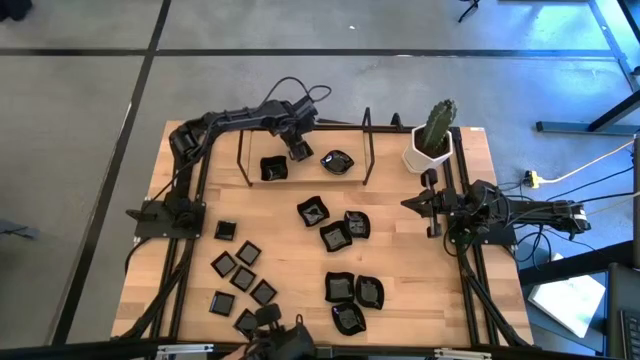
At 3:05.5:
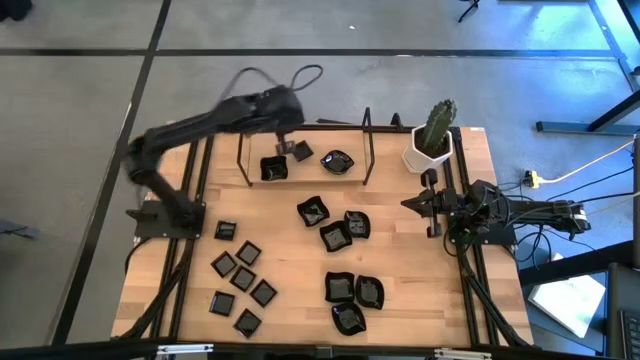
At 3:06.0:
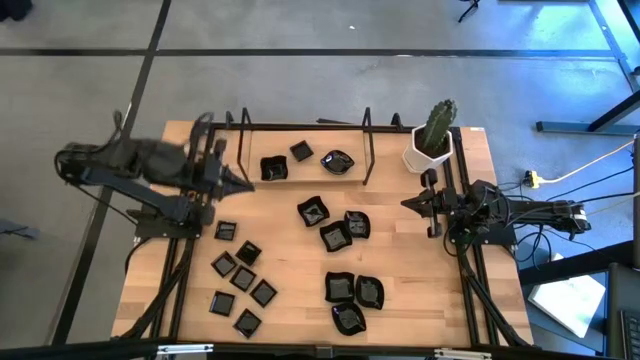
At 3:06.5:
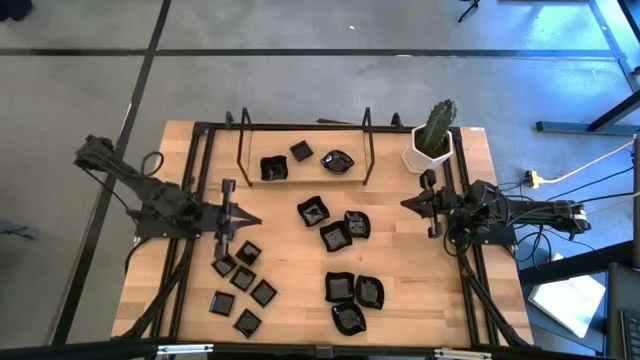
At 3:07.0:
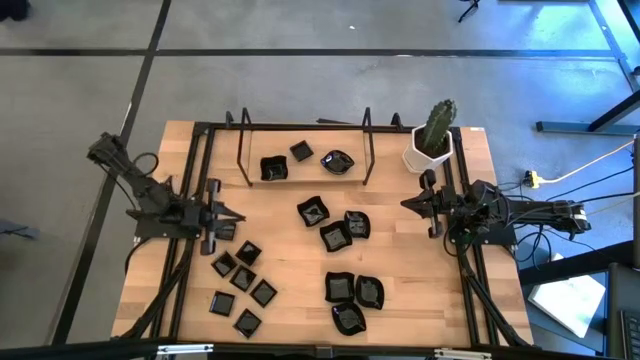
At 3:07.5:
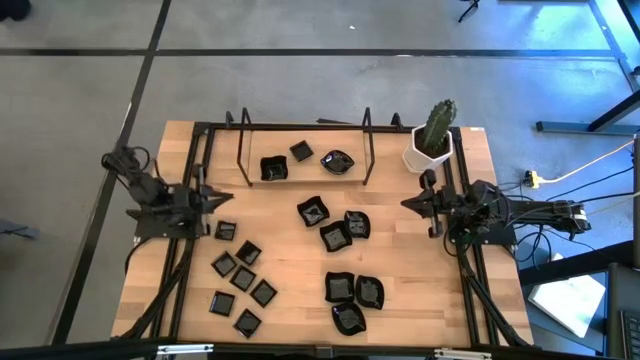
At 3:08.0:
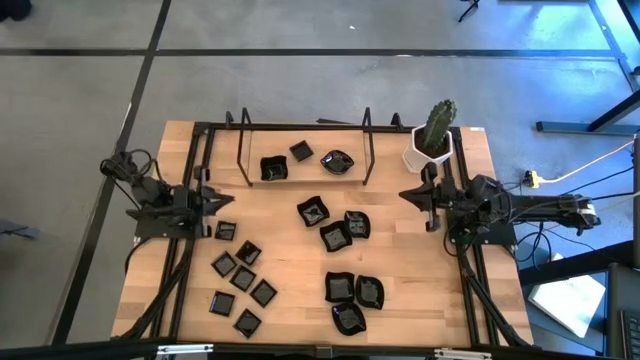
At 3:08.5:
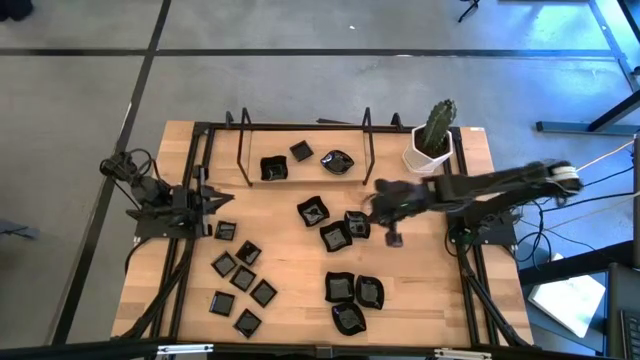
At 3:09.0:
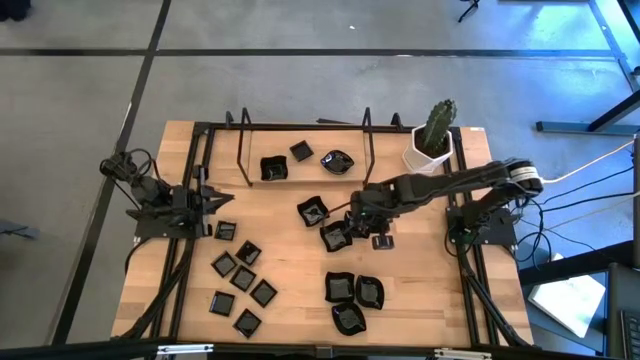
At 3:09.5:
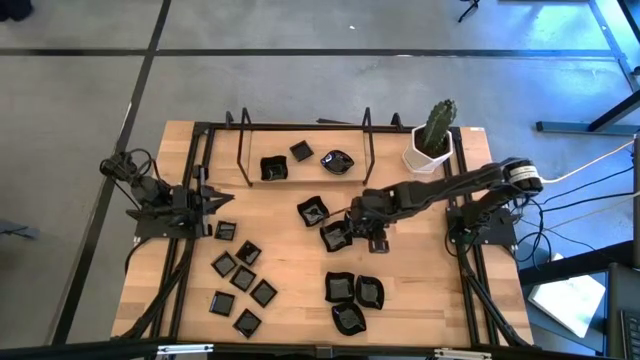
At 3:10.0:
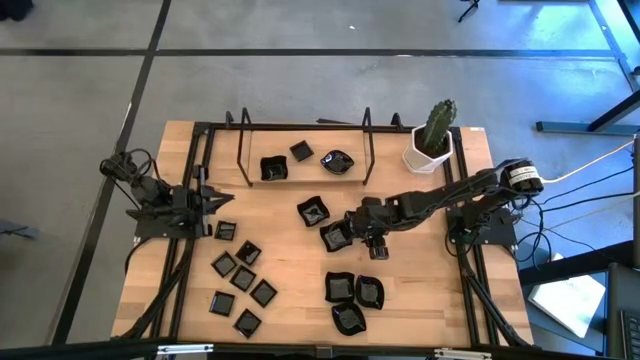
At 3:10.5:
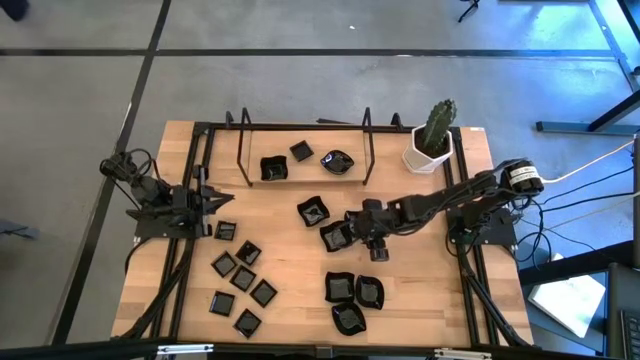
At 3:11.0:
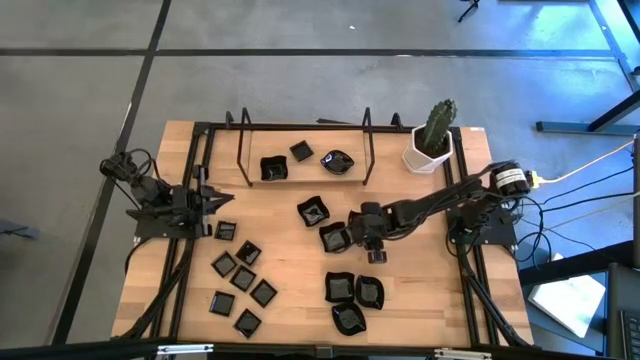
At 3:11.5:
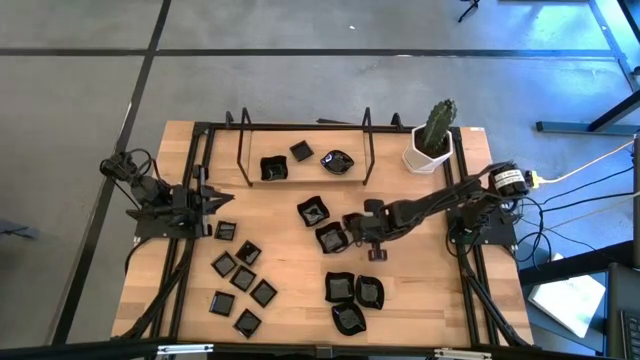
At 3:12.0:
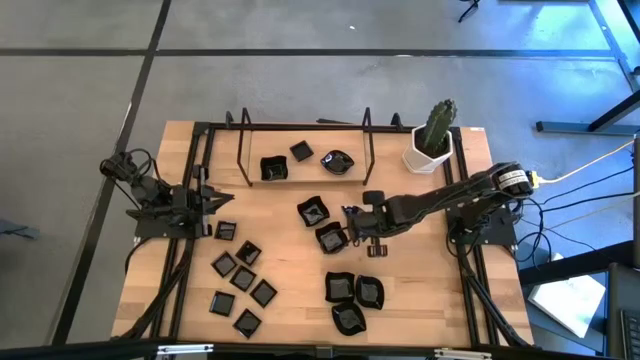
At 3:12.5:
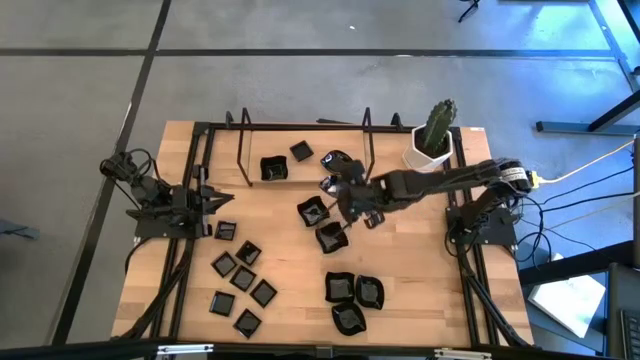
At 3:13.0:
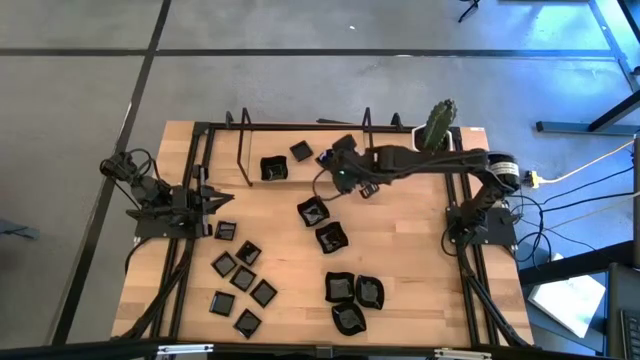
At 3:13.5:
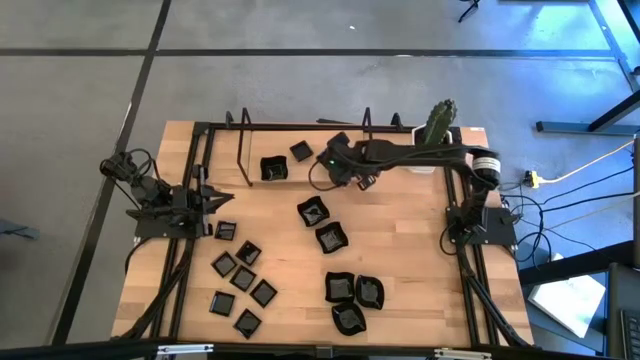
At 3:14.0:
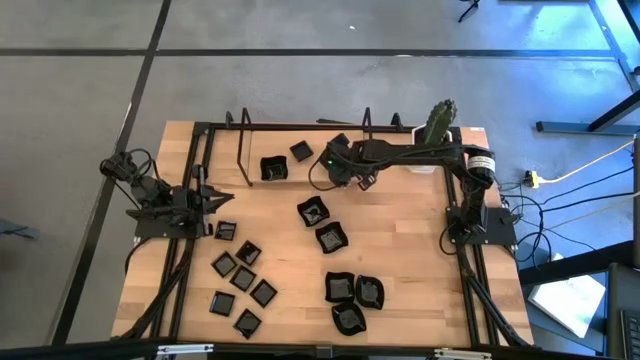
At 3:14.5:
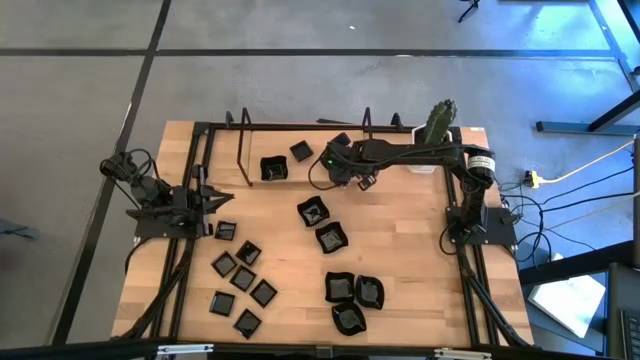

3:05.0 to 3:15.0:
Task: Pick & Place Mini shaped plates
Stack the leaf-shaped plate on top of the leaf-shaped plate on the shelf

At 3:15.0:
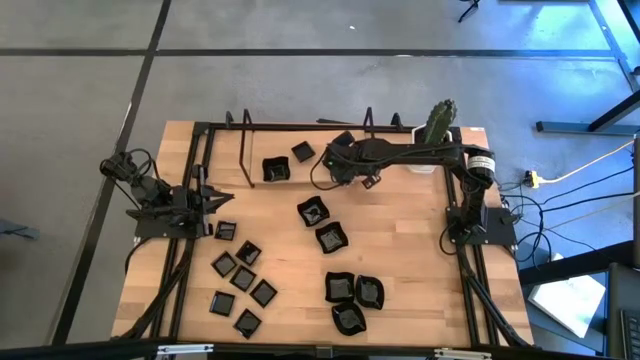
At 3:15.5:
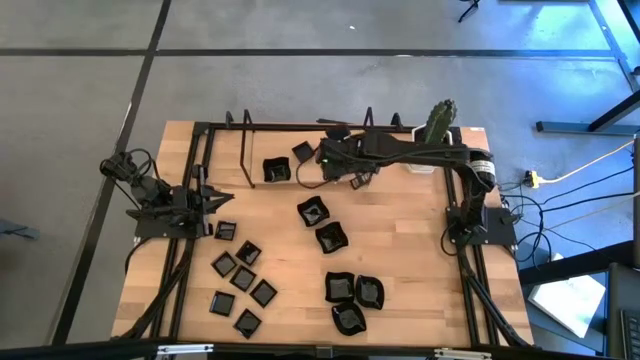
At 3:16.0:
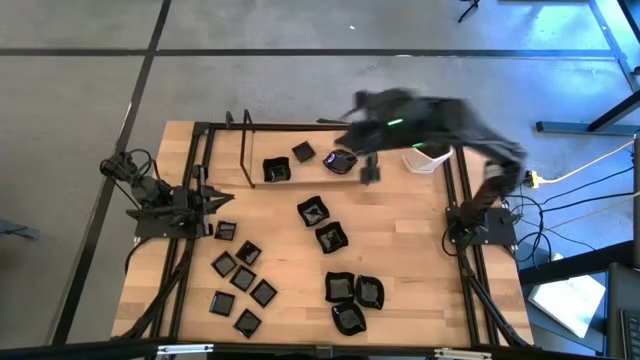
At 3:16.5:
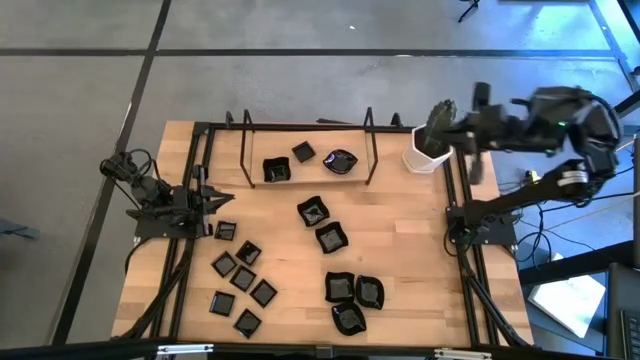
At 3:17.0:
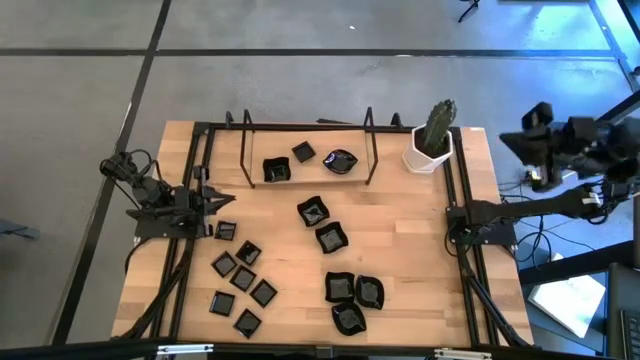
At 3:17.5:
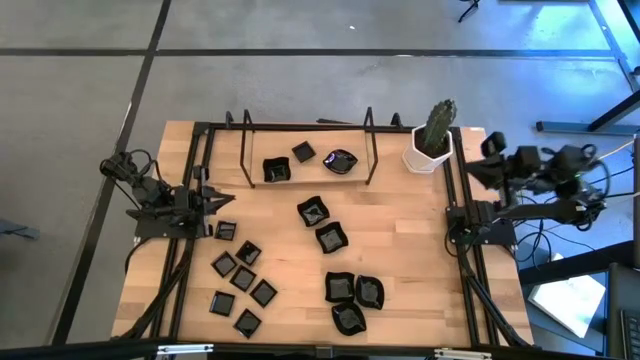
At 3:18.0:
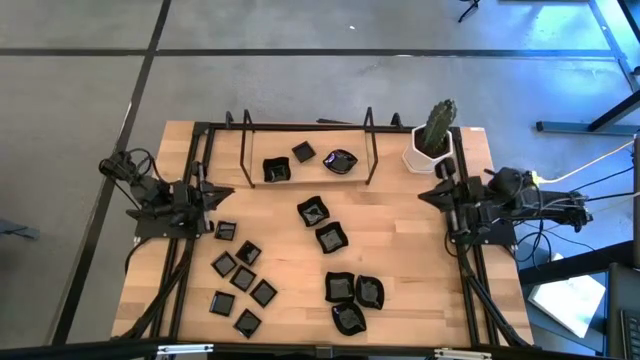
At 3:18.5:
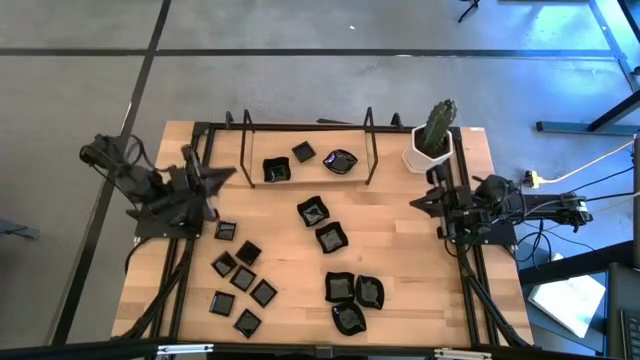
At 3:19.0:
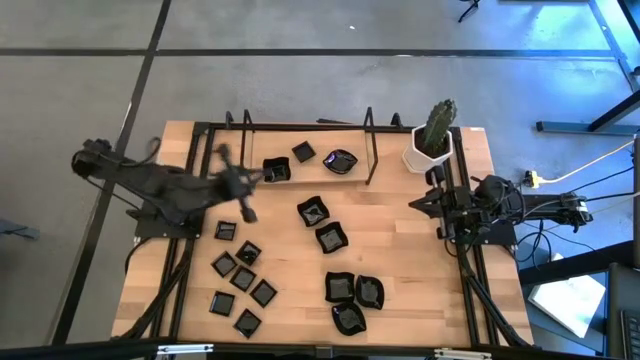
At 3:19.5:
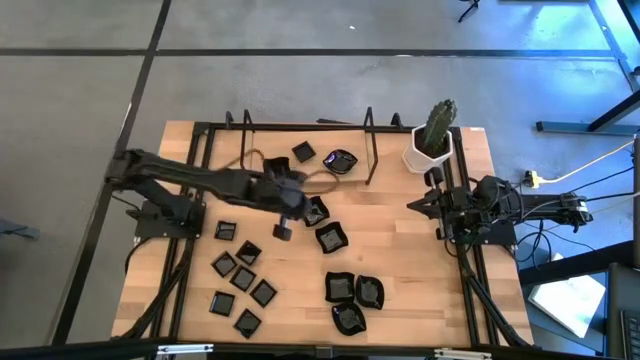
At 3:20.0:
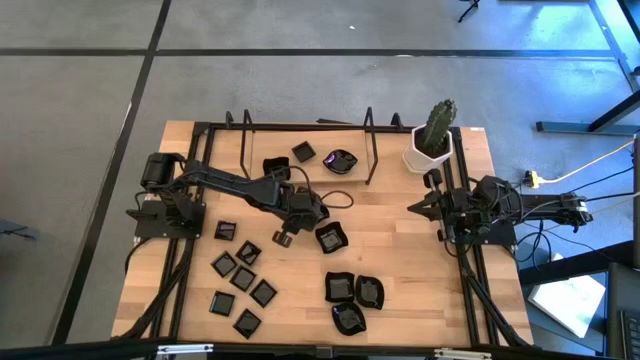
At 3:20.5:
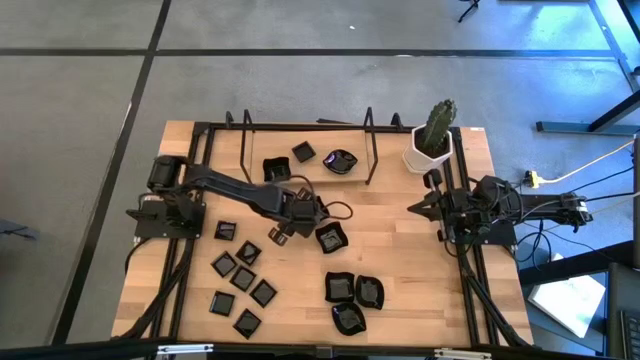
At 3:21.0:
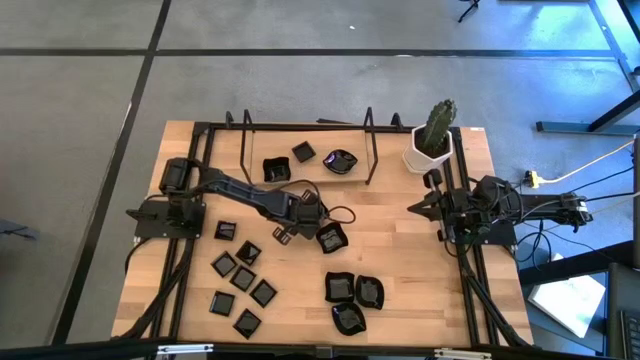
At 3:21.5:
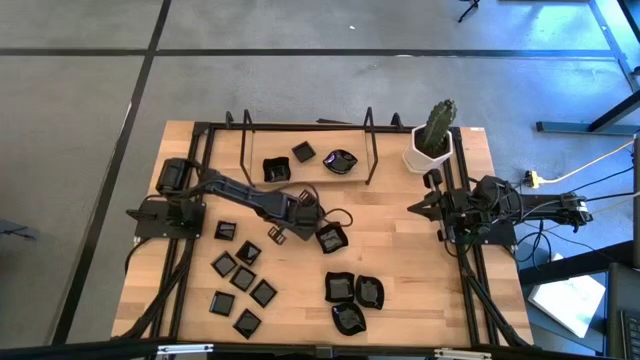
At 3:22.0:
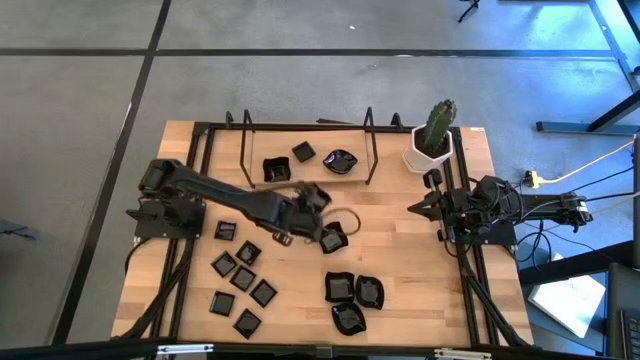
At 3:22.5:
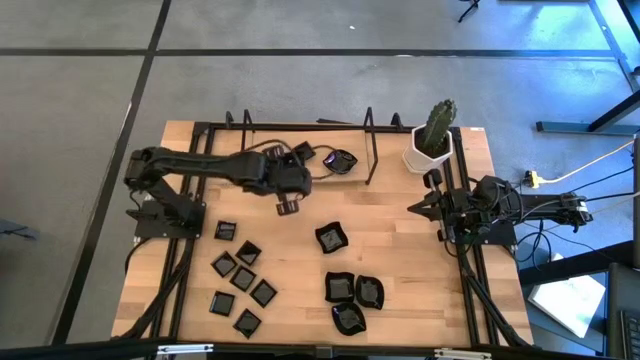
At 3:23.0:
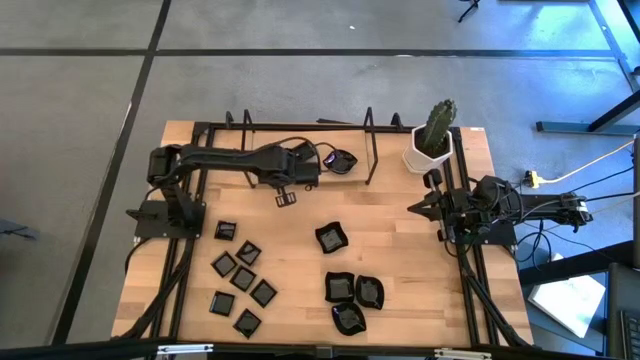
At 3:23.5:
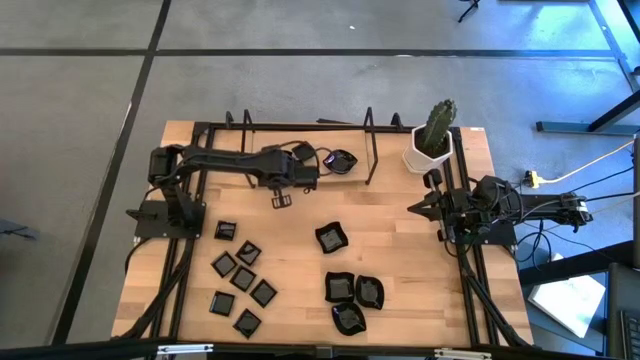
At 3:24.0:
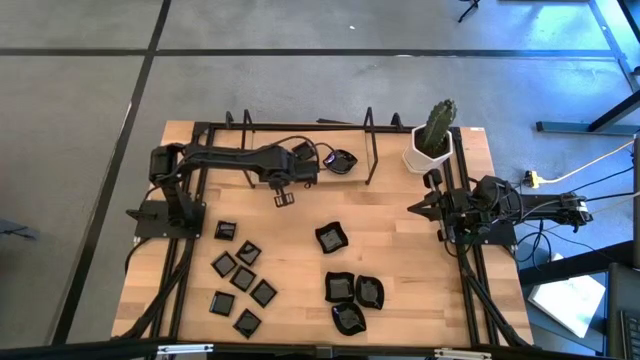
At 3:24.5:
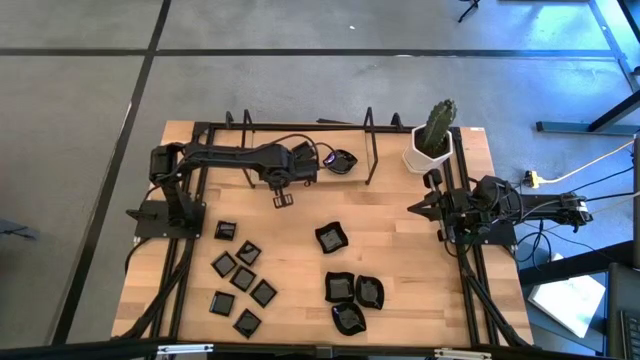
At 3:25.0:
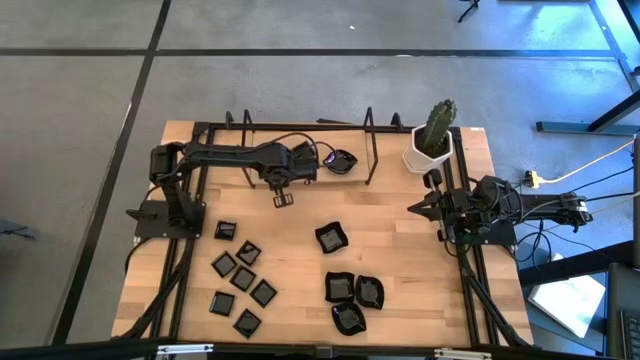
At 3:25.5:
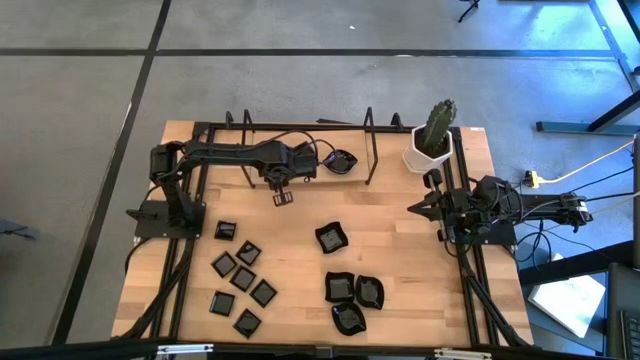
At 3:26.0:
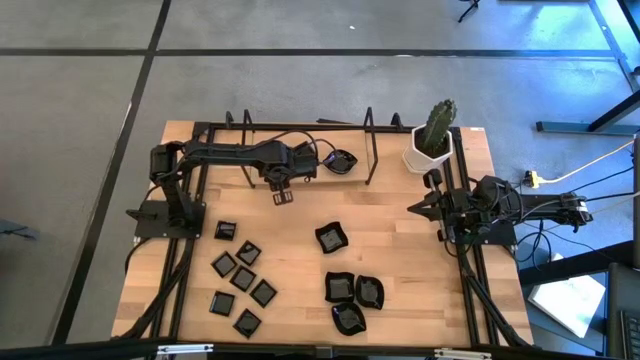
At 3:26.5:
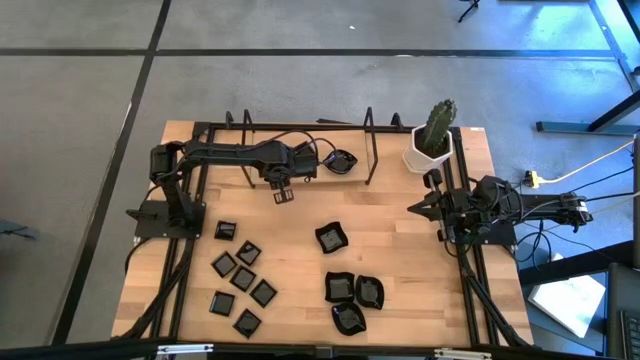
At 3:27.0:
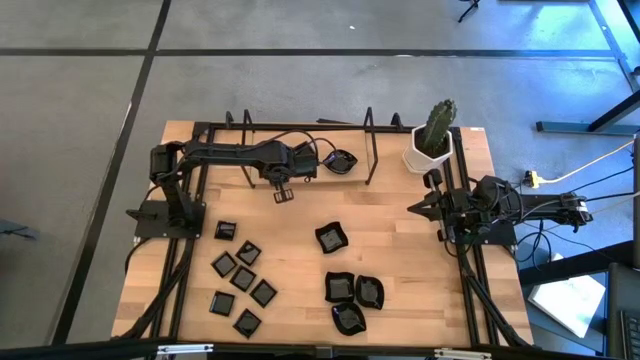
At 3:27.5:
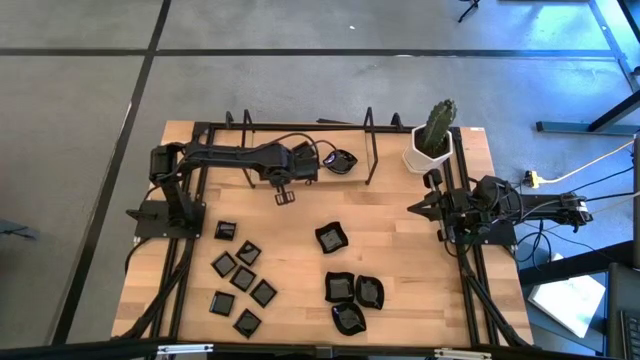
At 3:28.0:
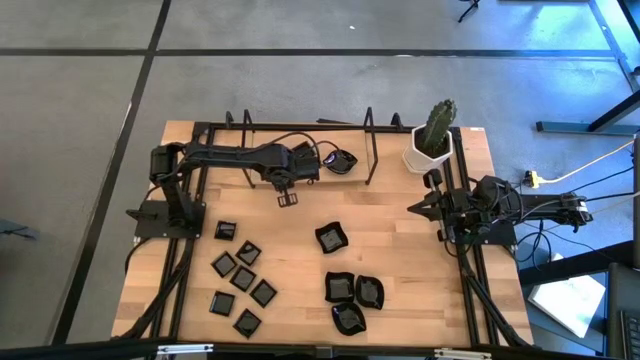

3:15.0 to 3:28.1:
Stack the distorted square plate on top of the distorted square plate on the shelf
